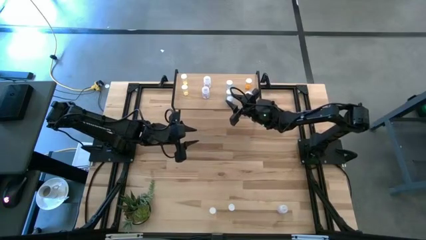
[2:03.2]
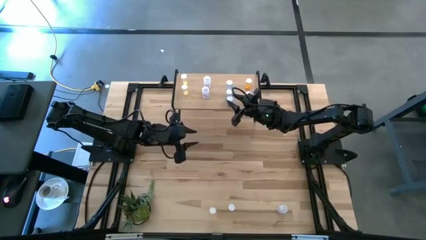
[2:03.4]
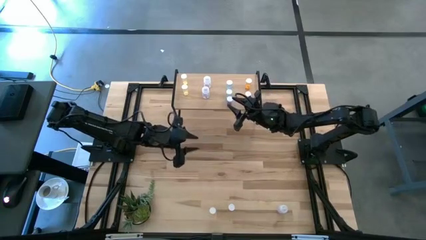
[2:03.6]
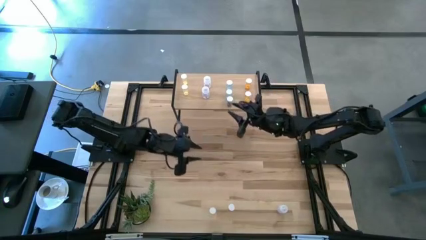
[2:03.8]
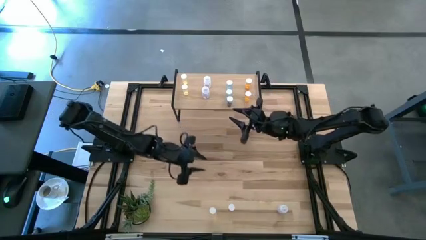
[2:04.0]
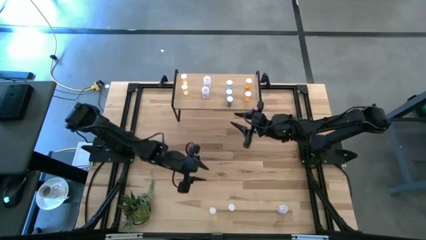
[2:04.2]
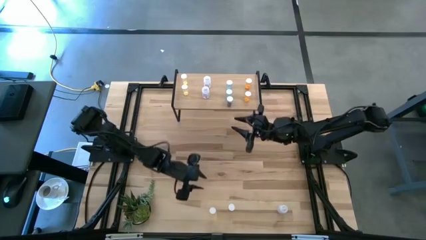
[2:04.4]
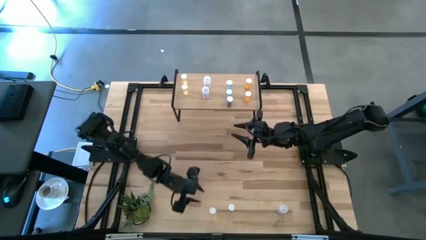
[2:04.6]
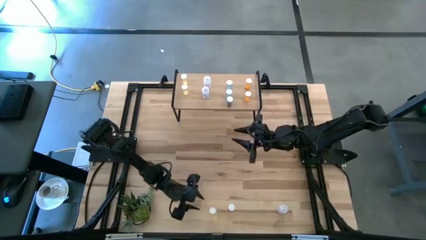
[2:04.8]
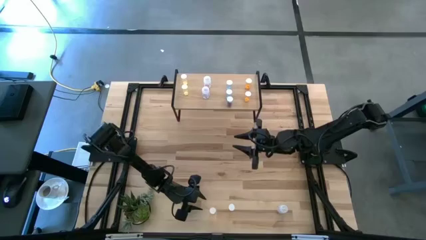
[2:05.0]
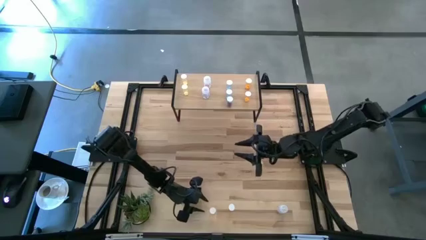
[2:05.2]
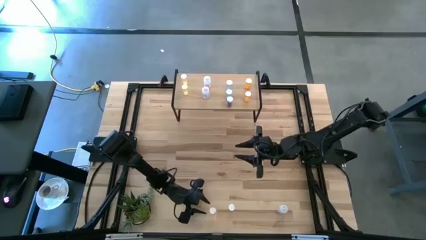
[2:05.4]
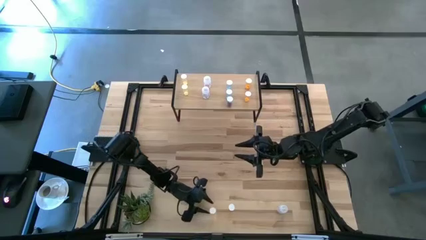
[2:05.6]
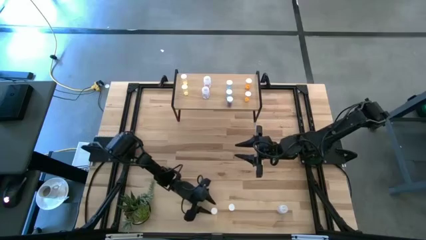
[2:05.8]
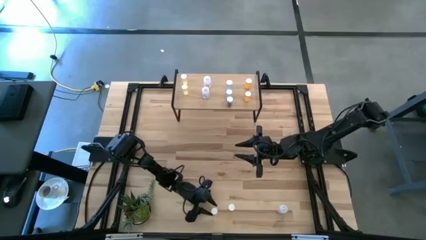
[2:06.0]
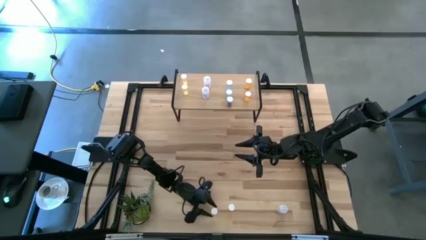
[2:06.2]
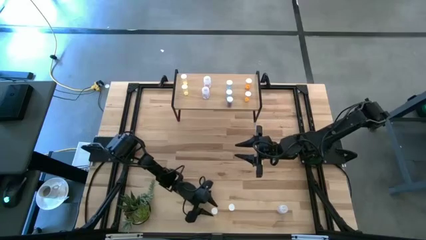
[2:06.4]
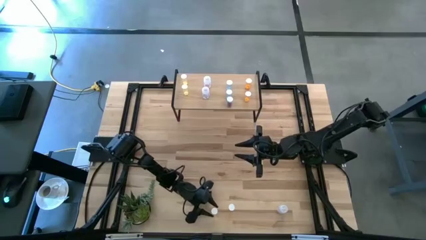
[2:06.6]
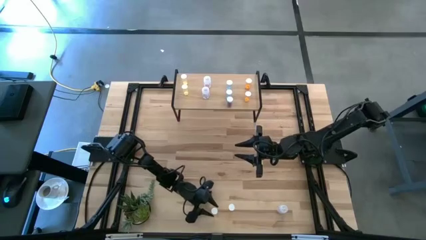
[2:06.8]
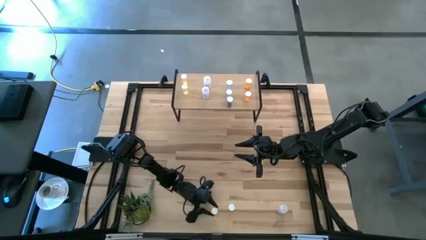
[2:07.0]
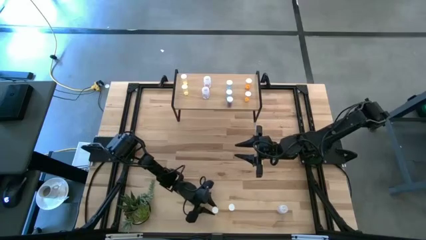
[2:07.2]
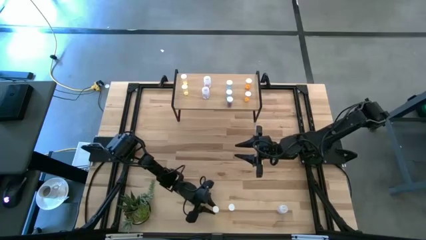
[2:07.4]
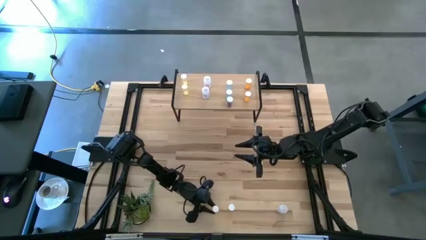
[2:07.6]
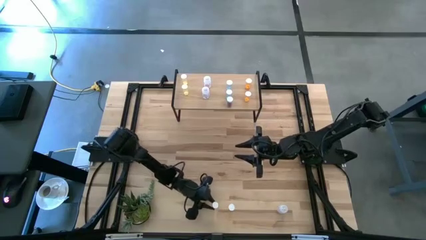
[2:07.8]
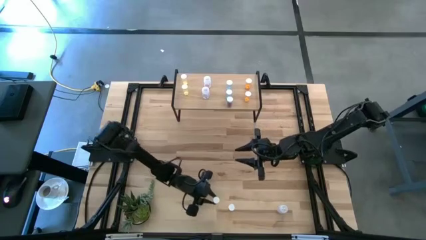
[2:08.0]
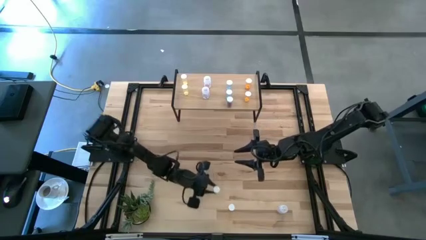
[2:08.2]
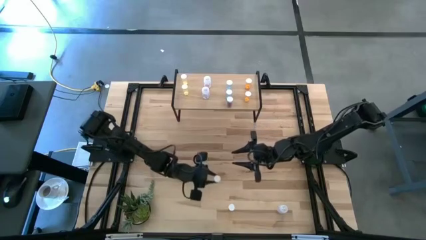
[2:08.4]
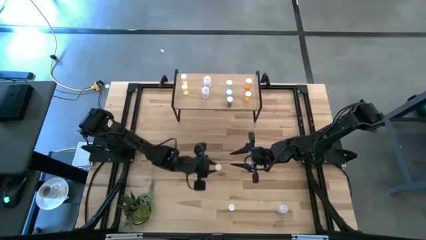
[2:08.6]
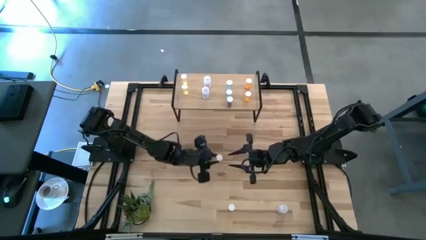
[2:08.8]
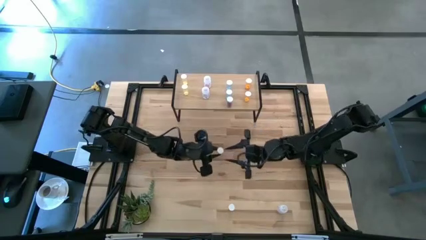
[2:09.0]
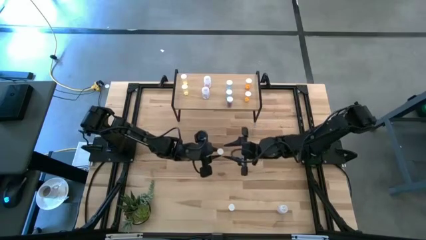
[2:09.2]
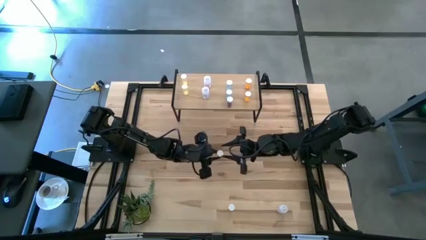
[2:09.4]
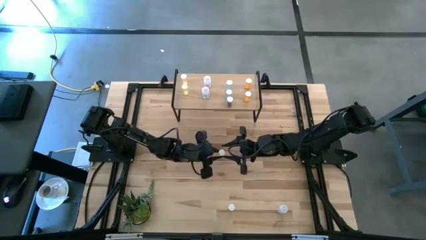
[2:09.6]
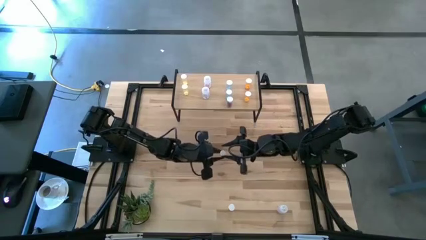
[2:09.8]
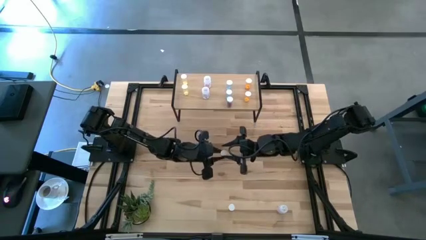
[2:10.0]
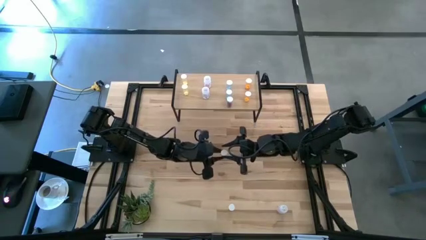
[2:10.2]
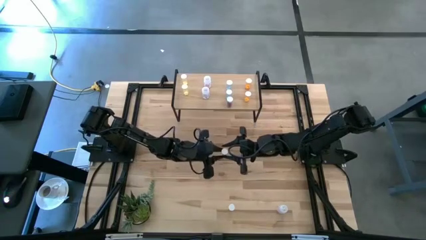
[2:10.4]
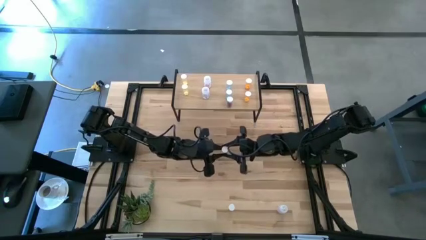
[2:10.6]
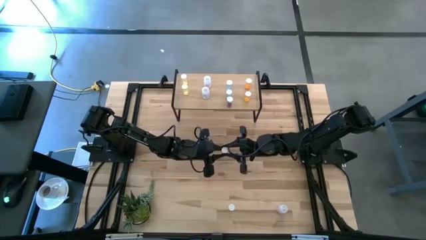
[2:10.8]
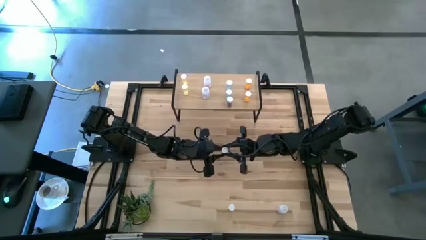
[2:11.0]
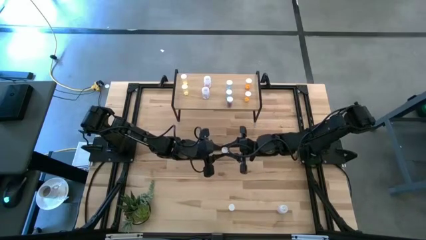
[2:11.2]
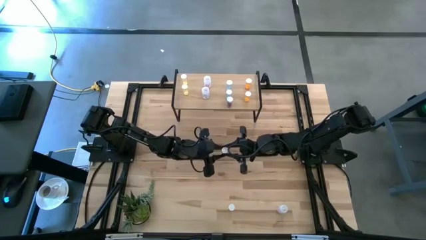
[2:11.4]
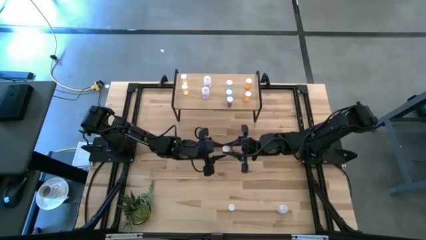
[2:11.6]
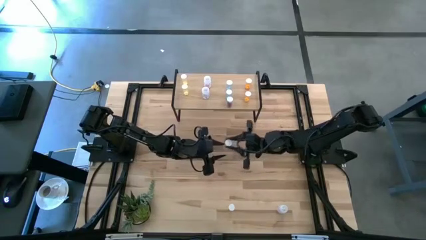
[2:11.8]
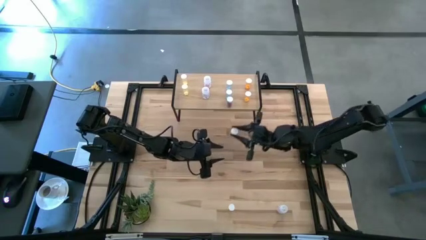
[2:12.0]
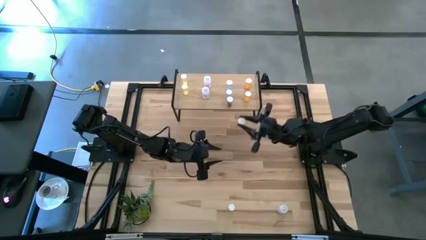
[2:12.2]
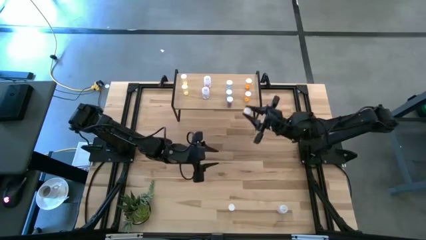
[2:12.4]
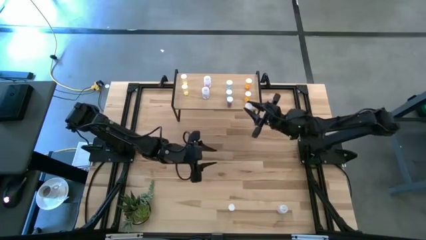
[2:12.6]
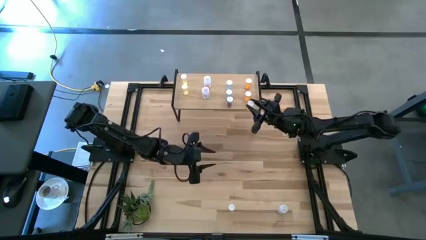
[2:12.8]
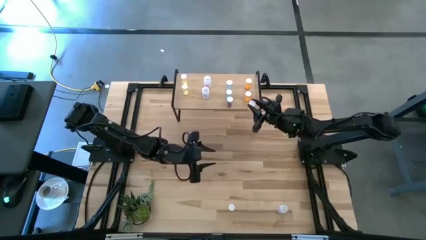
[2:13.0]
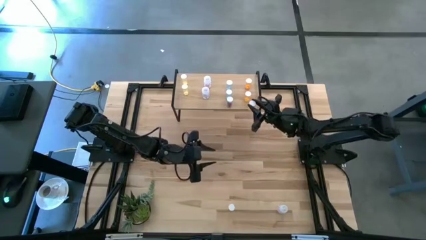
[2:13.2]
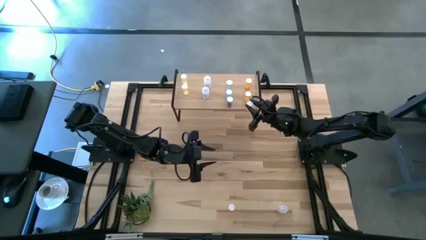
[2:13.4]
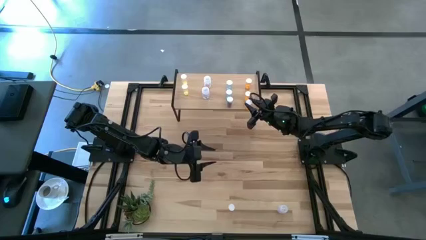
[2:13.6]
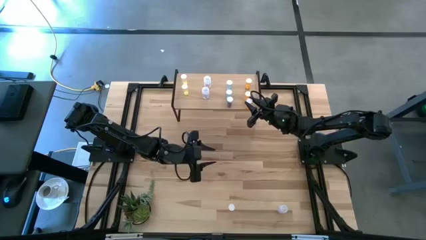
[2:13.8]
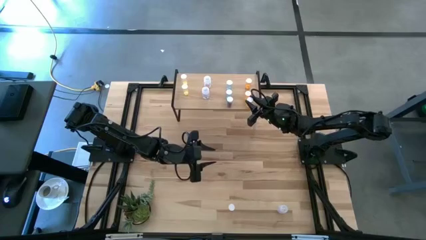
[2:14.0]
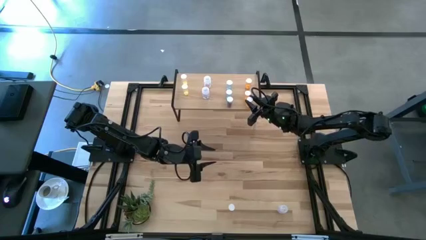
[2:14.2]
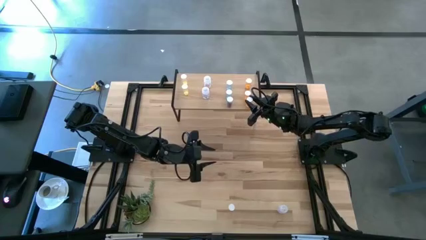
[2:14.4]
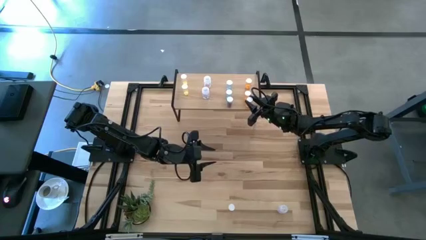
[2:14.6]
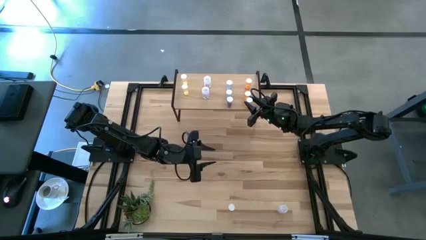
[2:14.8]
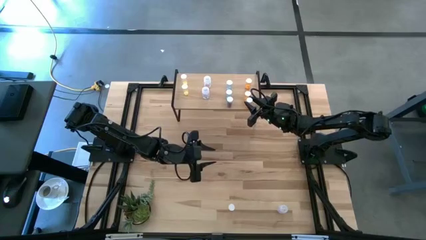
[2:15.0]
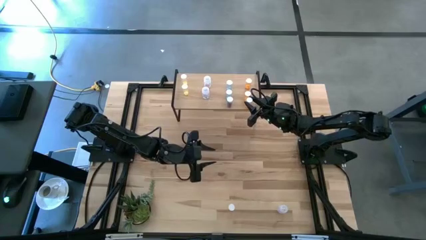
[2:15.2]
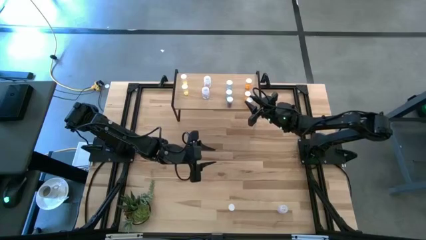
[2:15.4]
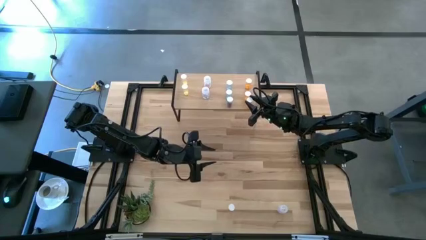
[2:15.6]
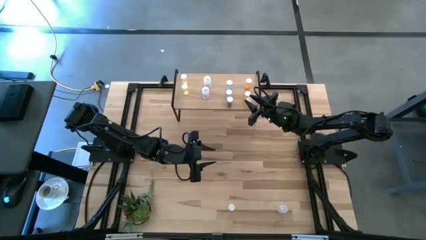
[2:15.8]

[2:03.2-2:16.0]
Task: Pick and place medicine bottles onto shelf by color
Put the orange pill bottle on the shelf aligned with the orange pill bottles

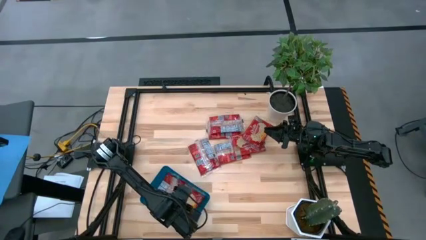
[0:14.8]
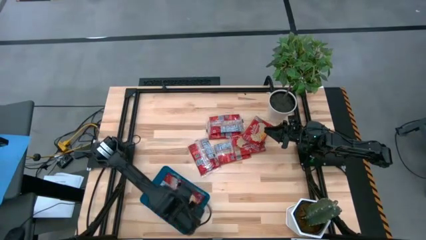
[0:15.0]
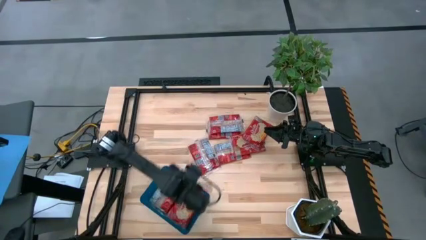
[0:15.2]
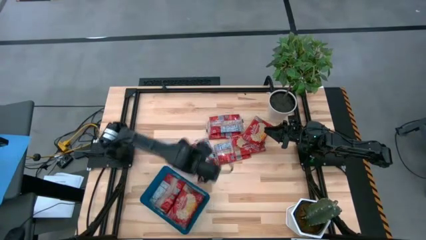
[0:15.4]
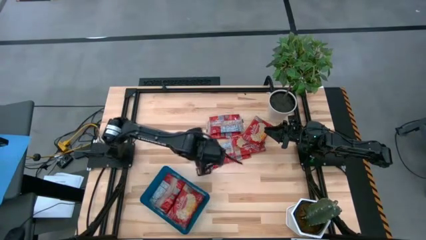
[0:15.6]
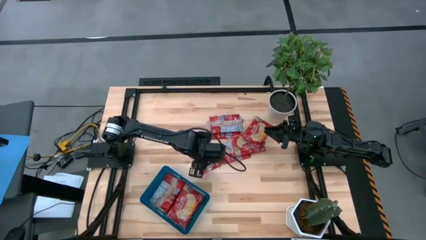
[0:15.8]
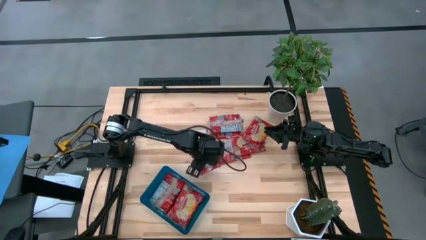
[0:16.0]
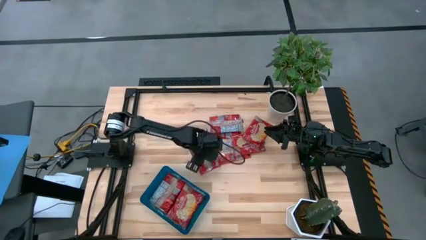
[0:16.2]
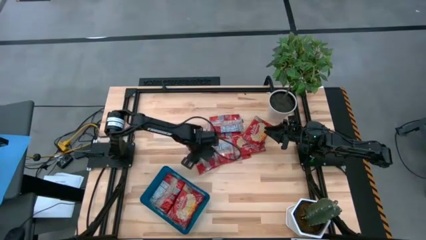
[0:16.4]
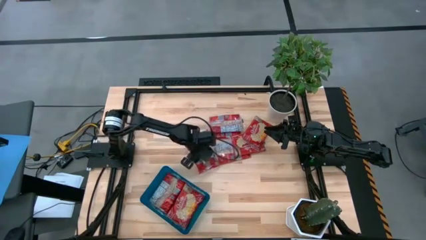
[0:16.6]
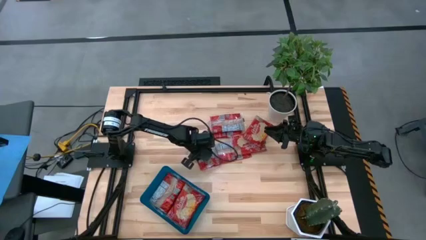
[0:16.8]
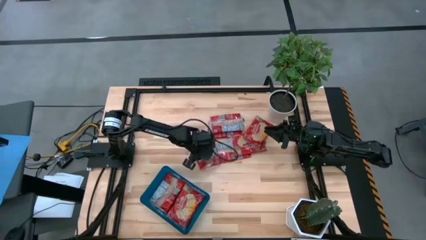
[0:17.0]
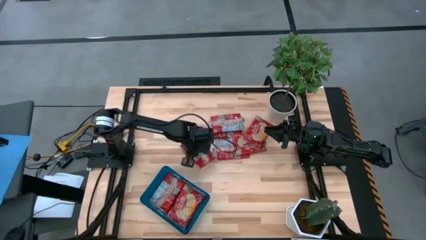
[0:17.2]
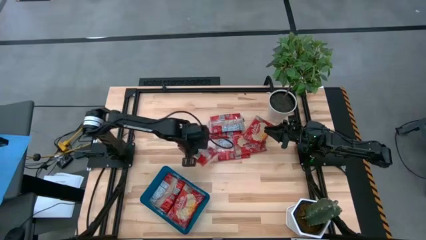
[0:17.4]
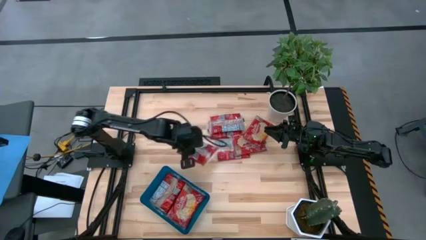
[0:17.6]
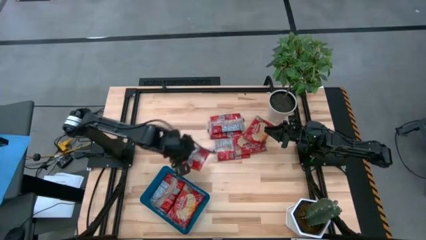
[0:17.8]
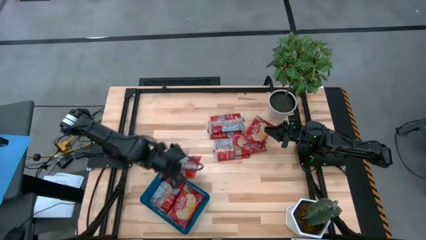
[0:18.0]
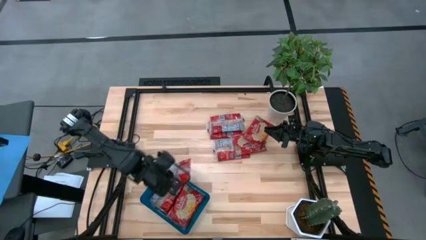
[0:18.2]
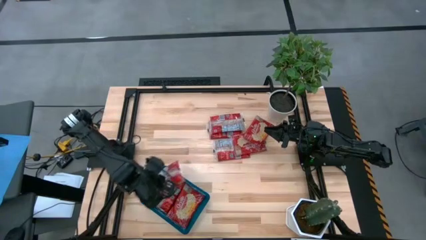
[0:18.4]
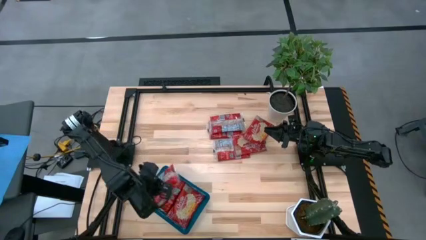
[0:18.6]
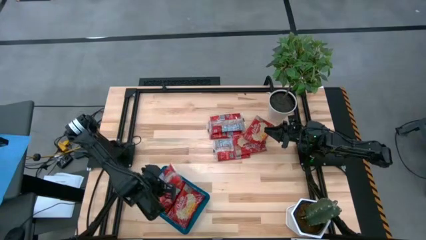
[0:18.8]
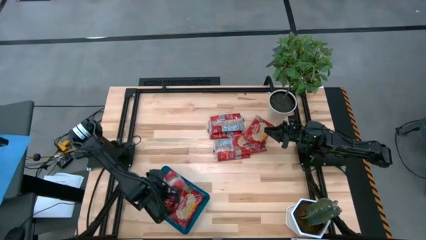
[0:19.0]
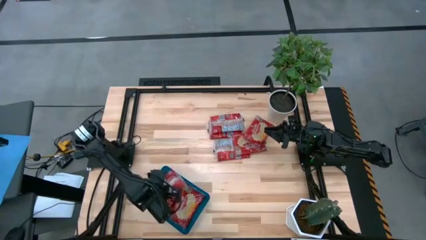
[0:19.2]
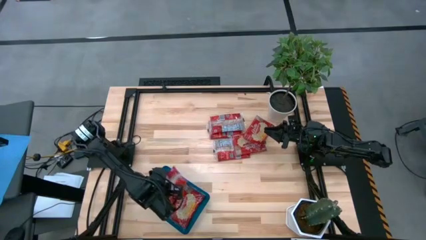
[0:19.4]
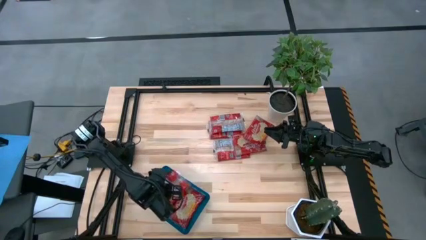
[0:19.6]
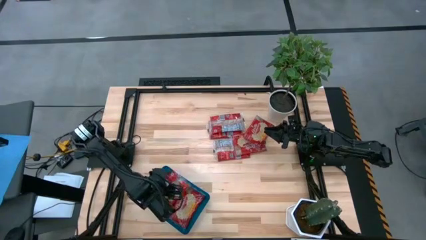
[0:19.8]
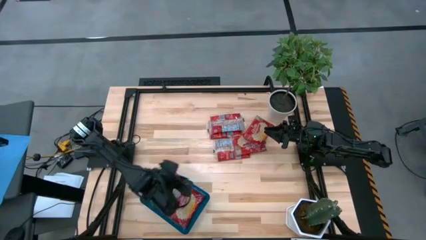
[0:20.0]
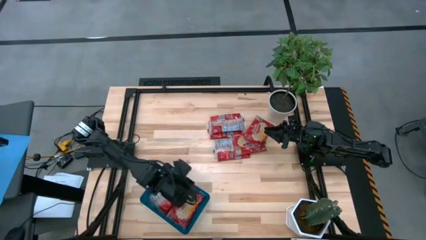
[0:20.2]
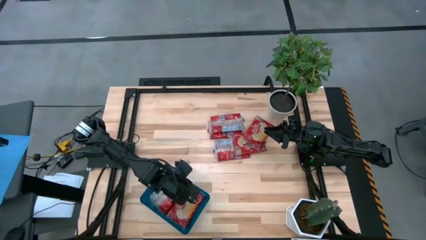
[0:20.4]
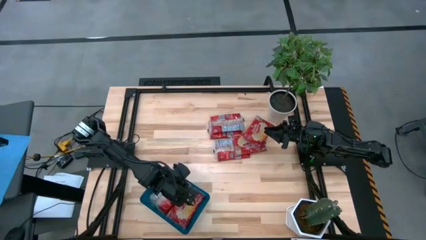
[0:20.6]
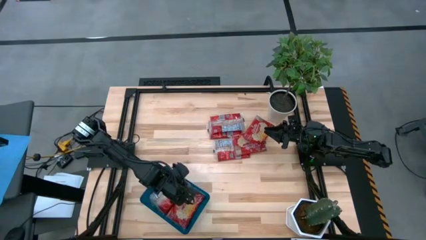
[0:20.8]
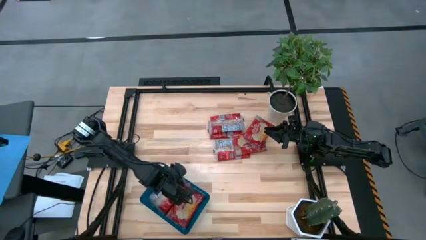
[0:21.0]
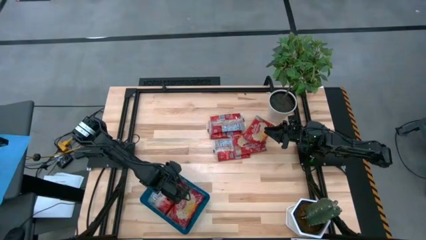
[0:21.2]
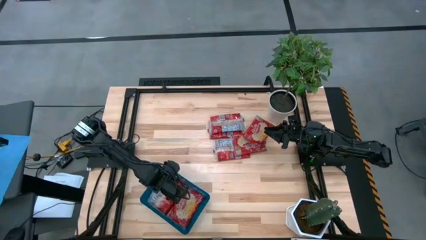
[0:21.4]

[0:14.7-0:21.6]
Task: Sort popcorn bags into baskets
Put the red popcorn bag into the blue bin
